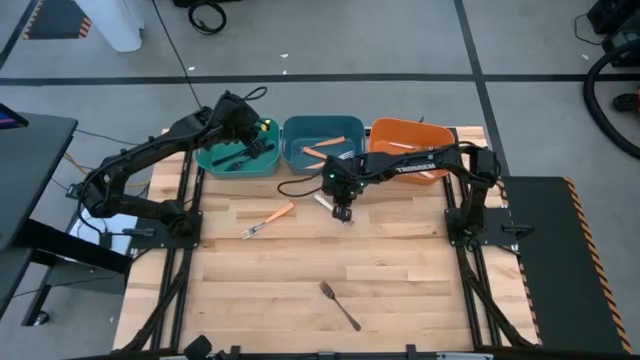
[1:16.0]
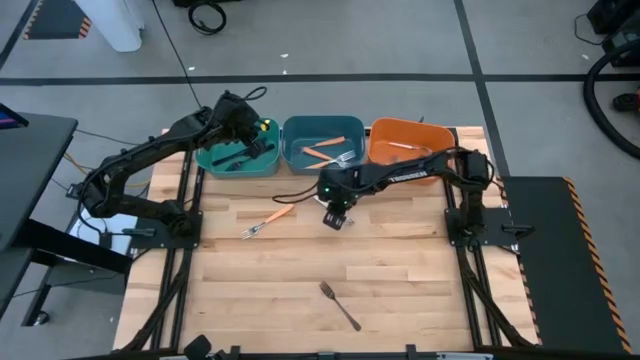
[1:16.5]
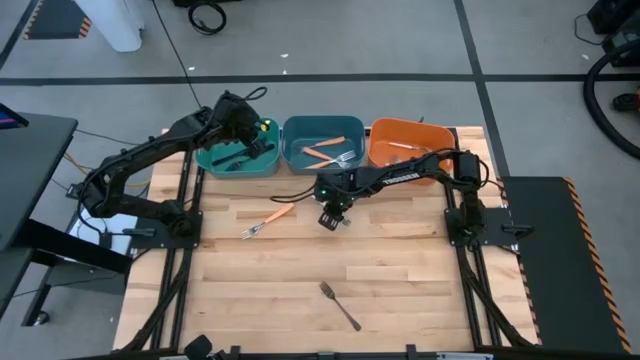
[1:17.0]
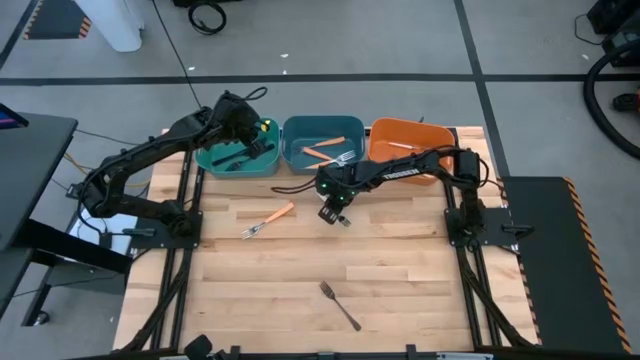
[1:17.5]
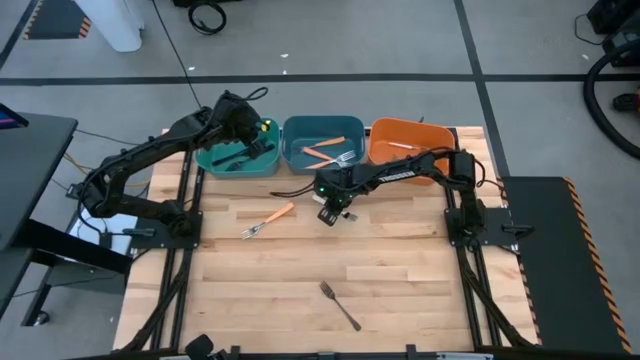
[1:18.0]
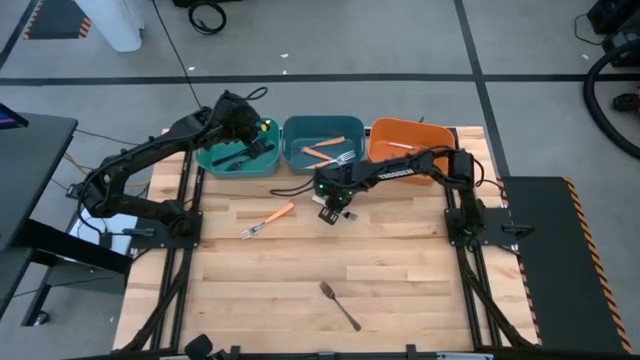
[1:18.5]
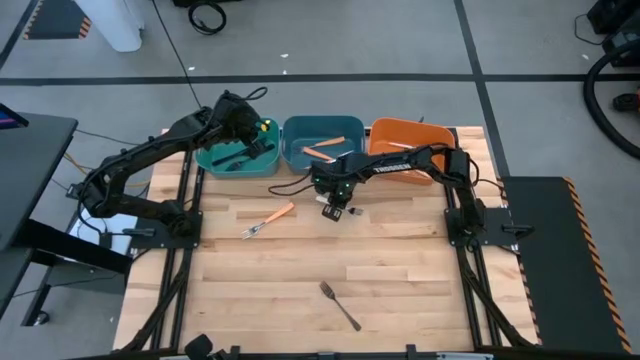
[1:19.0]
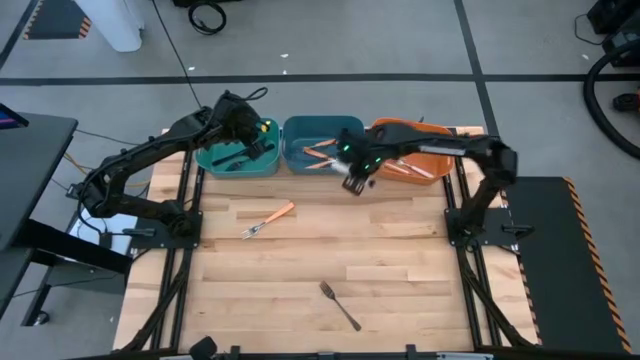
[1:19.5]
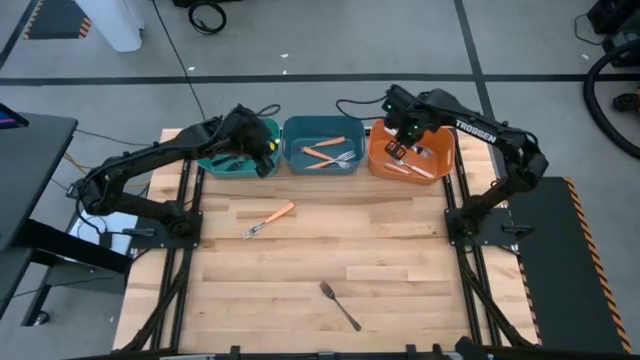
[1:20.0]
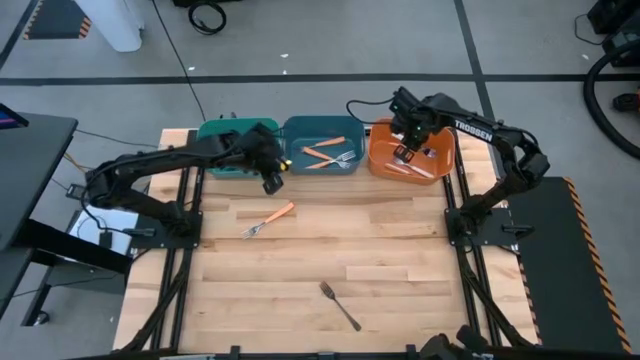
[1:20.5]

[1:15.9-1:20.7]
Task: Sort silverware by color (type)
Put the white fork in the orange bin

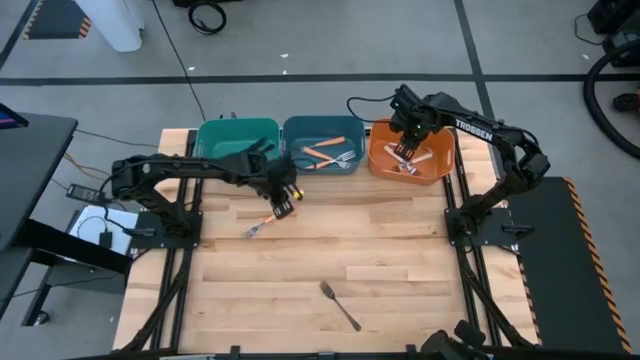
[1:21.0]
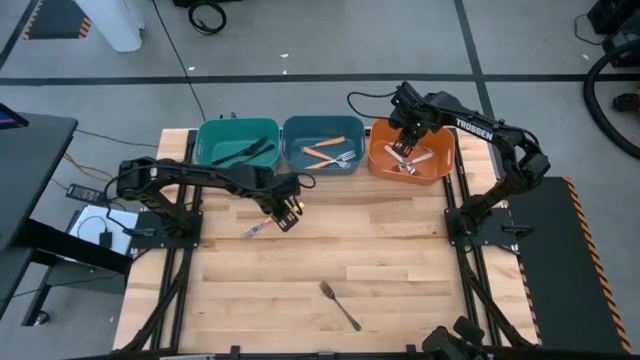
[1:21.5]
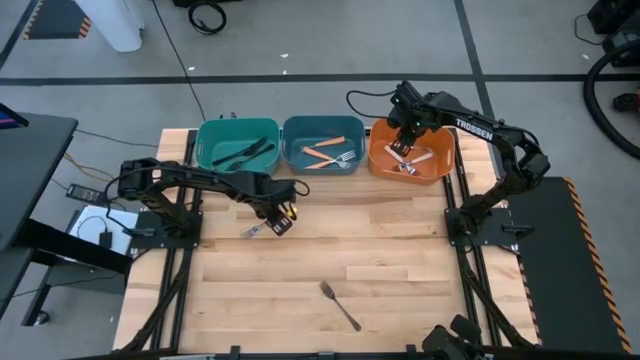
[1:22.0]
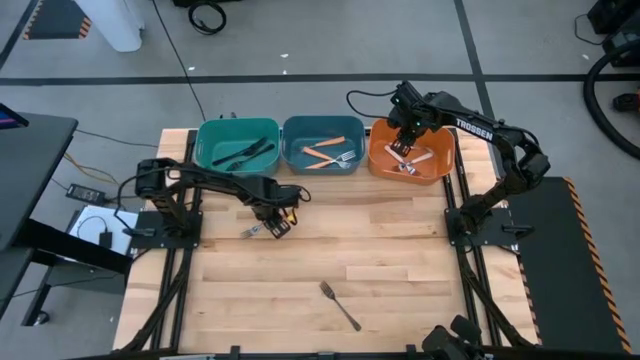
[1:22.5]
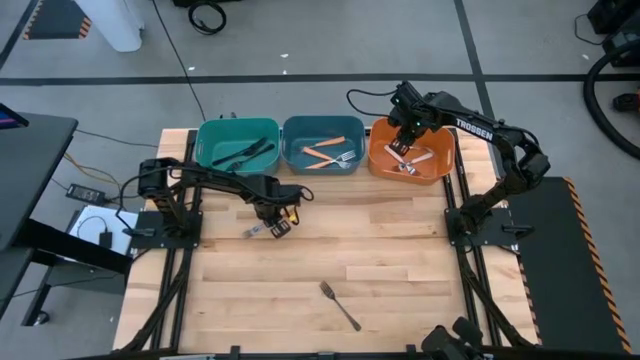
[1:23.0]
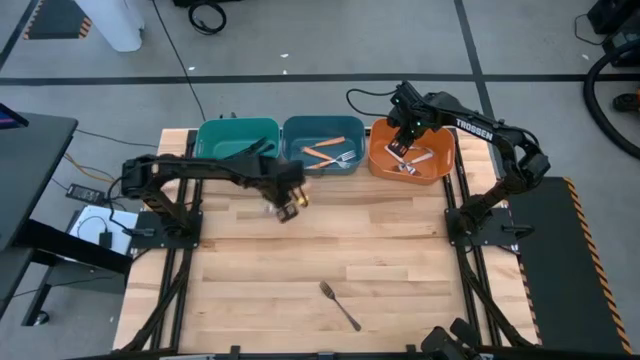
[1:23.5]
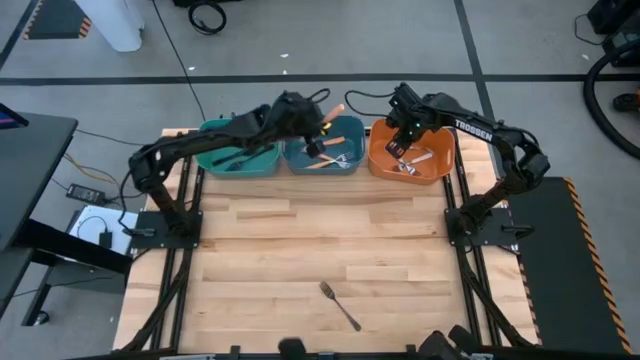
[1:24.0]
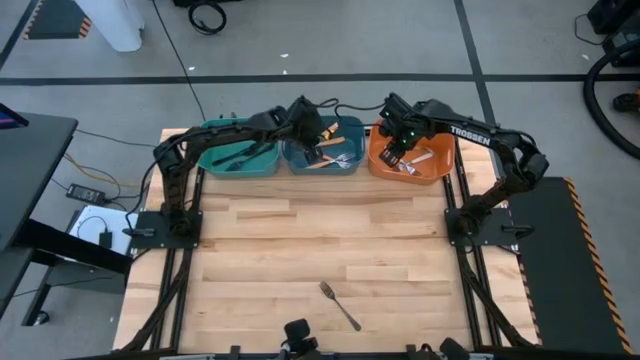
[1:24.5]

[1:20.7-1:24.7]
Put the orange fork in the blue bin

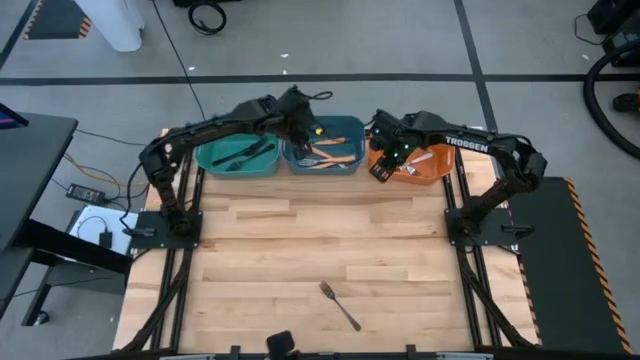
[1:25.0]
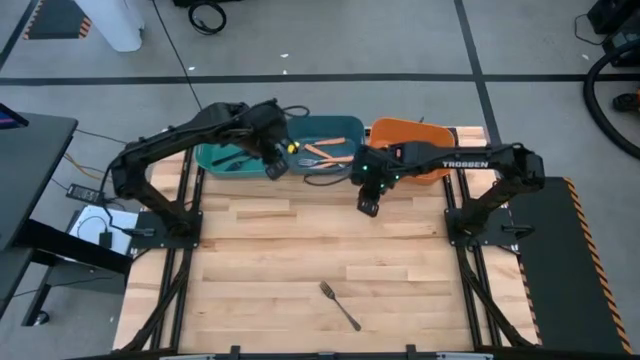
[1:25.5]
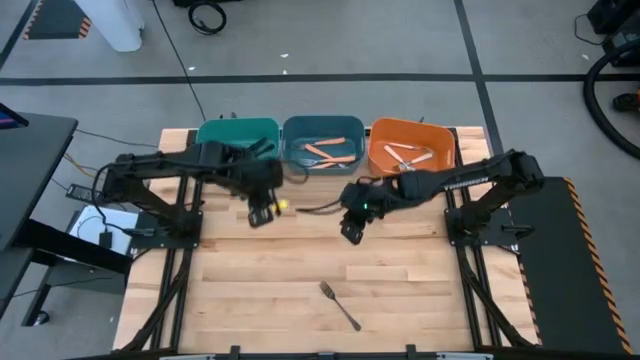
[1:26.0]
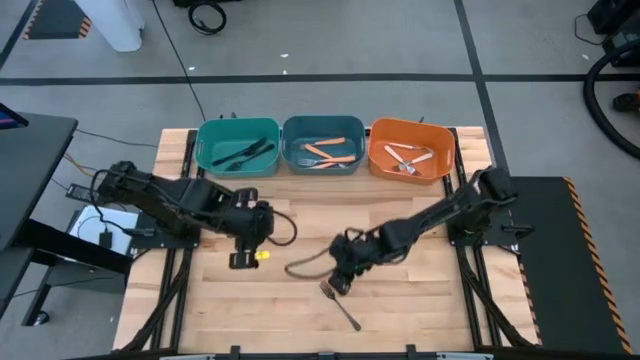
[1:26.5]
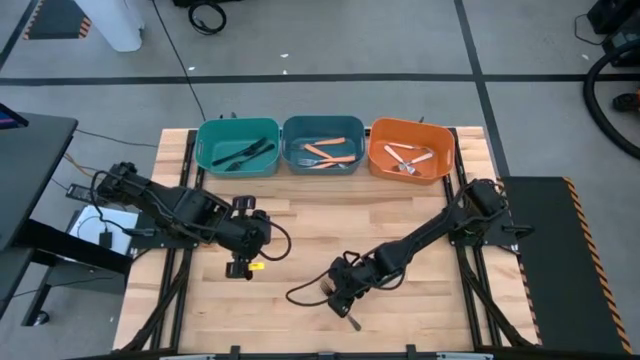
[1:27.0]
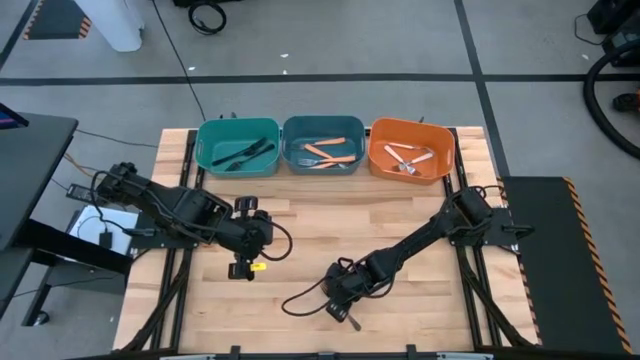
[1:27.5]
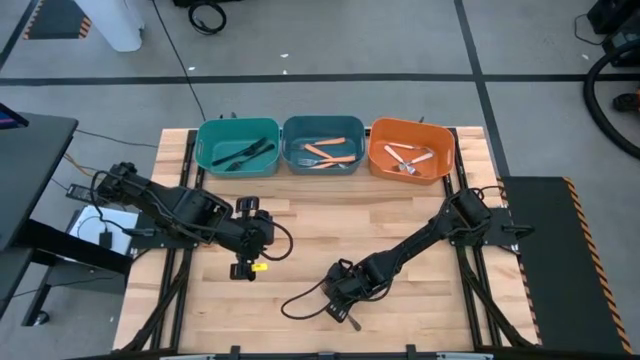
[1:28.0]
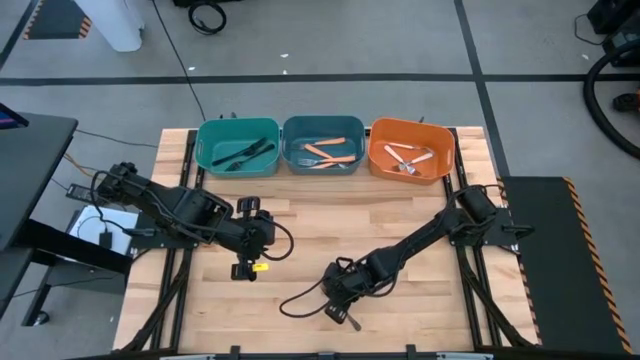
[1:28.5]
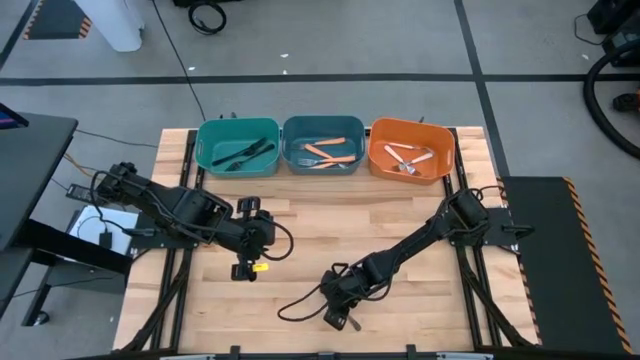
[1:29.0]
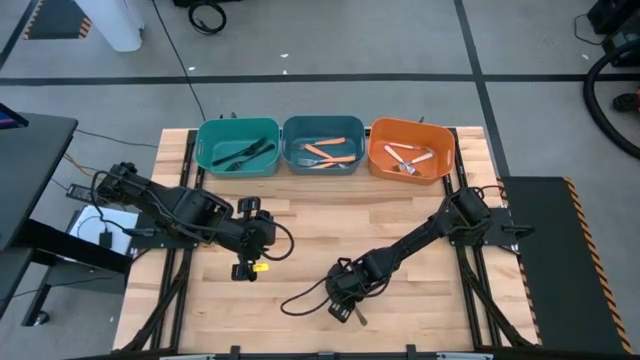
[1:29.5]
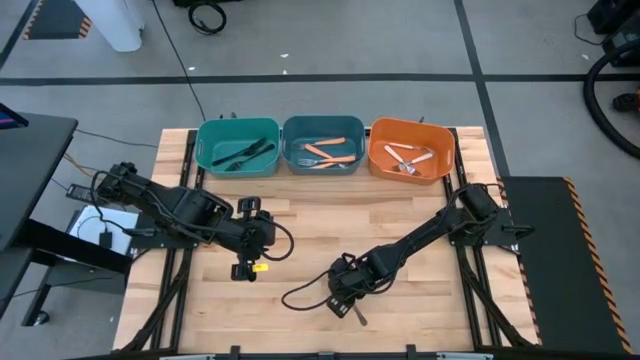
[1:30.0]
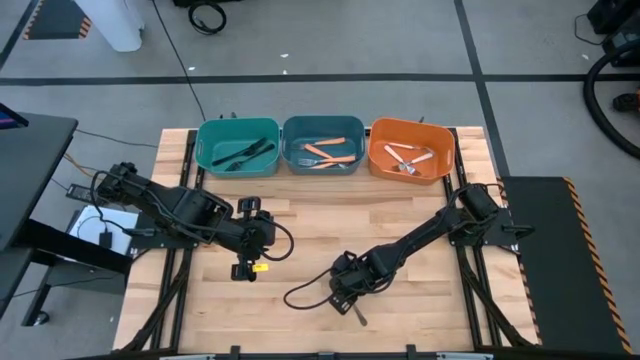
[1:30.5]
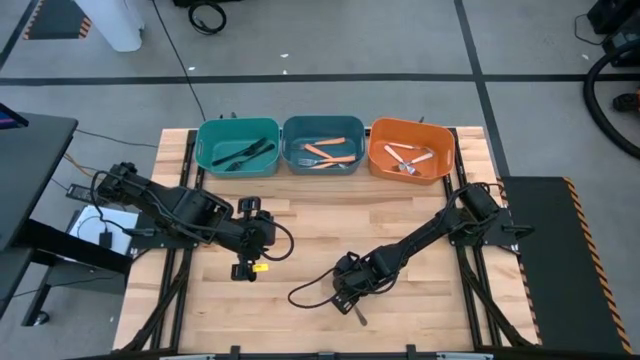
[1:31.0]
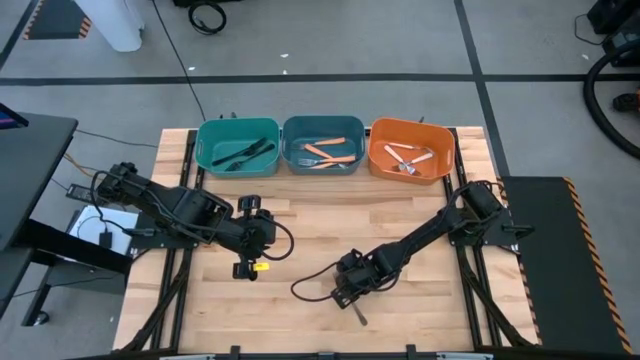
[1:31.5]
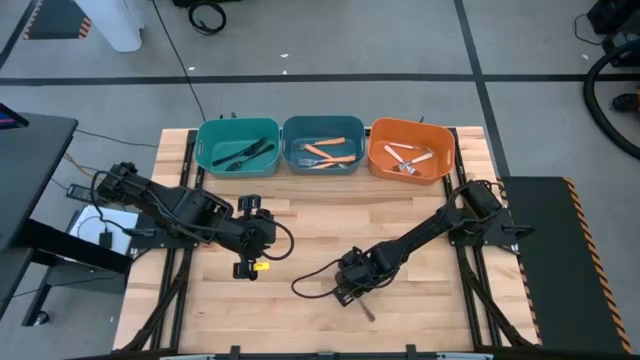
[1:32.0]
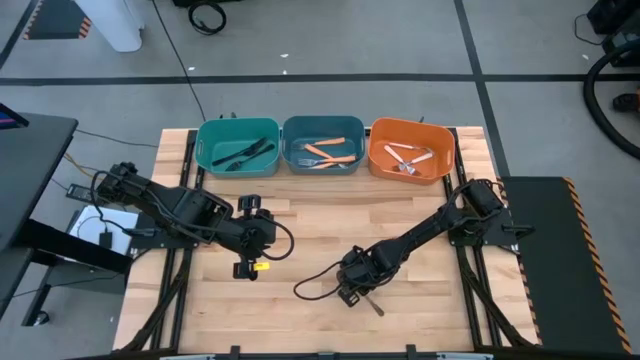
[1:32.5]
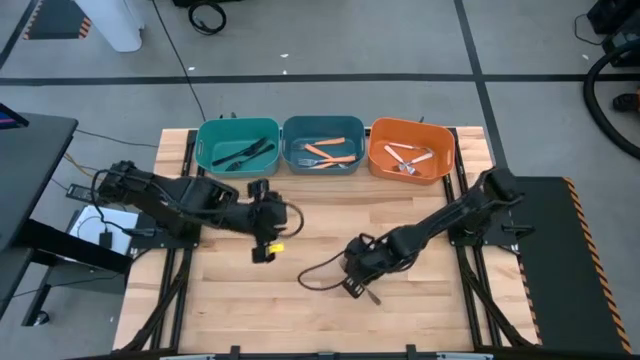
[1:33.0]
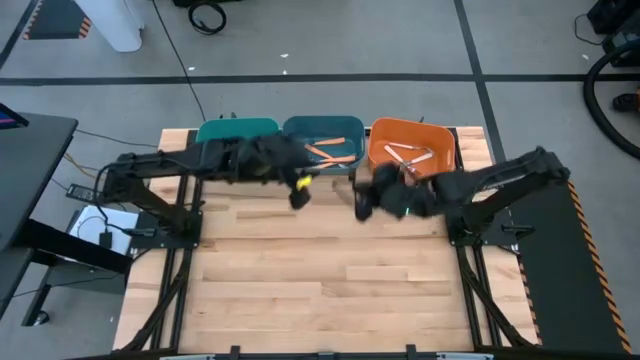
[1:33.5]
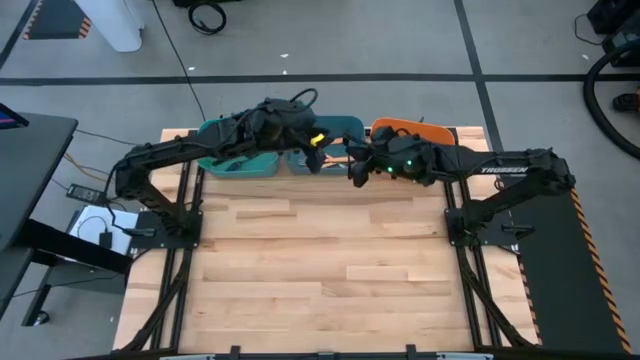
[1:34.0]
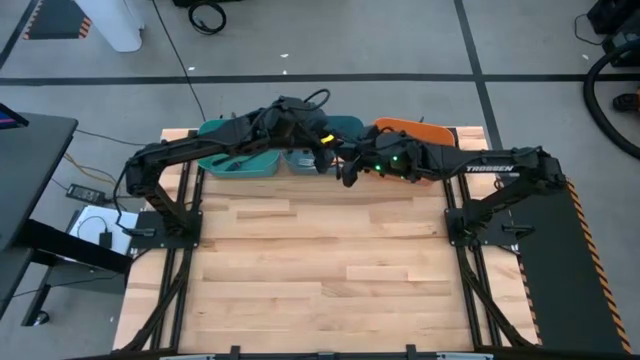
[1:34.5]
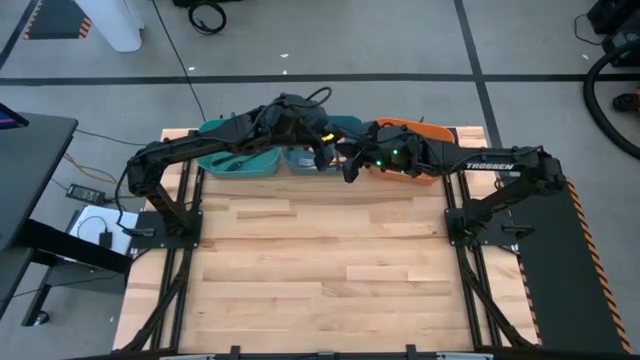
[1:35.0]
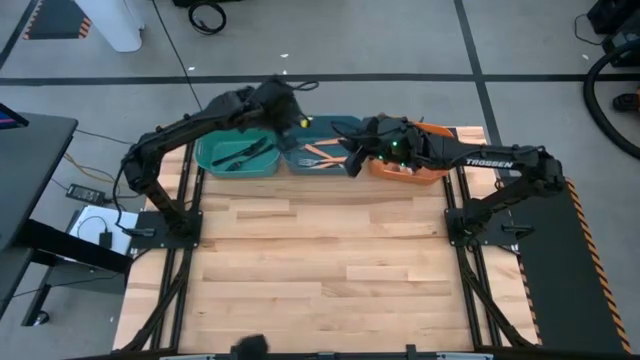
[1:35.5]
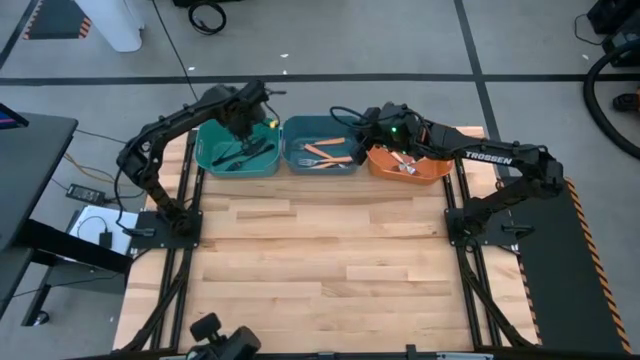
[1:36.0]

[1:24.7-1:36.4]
Put the black fork in the green bin

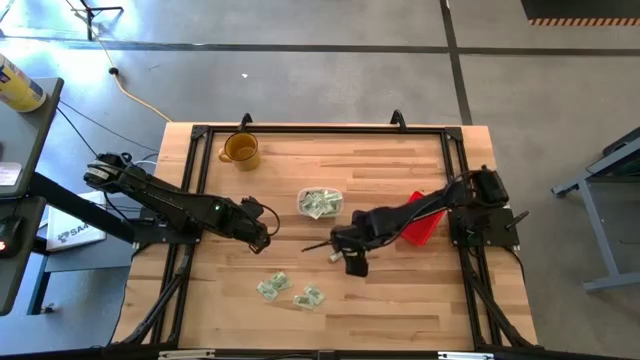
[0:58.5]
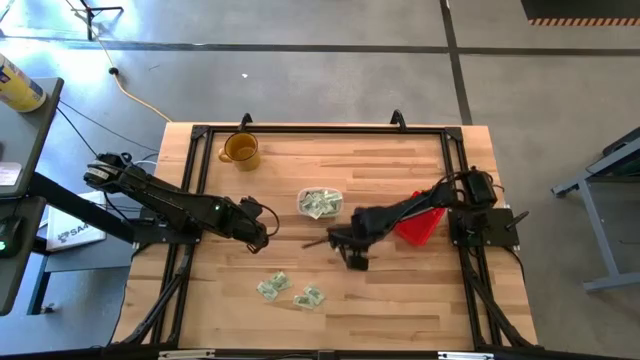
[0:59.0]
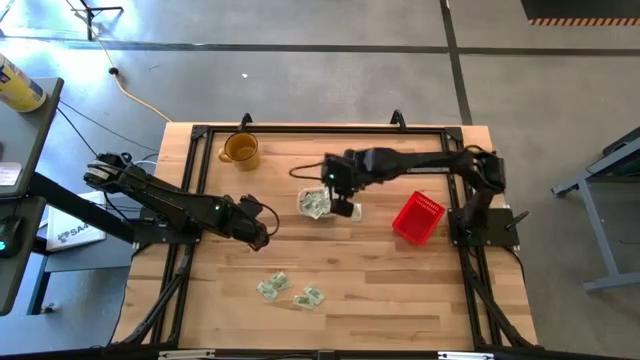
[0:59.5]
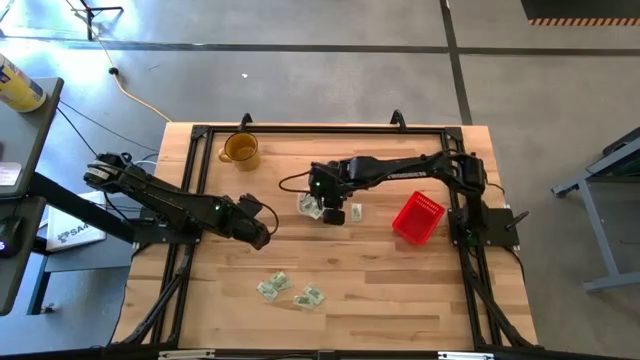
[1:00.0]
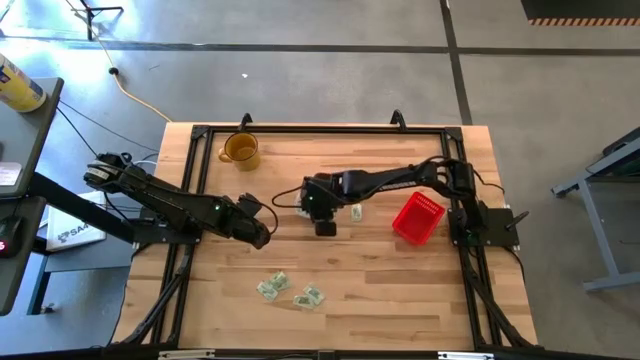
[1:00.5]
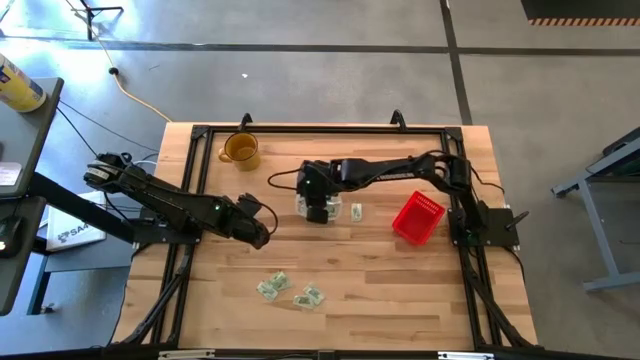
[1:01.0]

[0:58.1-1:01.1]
Task: Pick and place items into bin
Put the white stevia packet into the transparent bin
